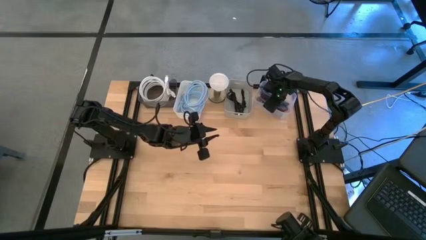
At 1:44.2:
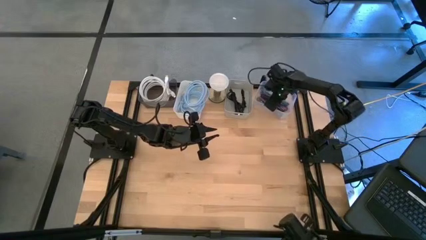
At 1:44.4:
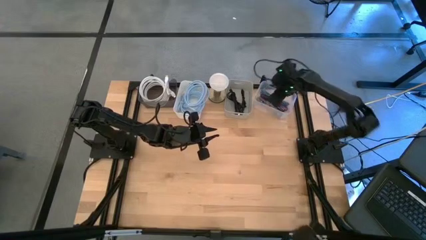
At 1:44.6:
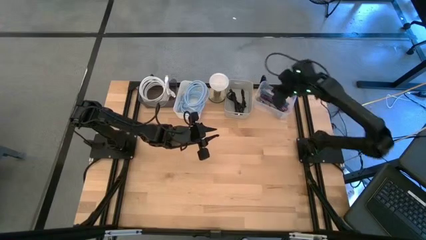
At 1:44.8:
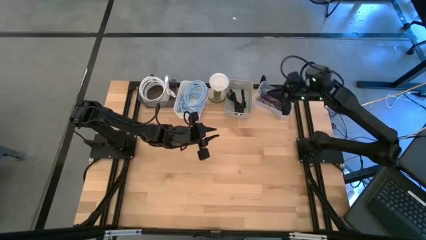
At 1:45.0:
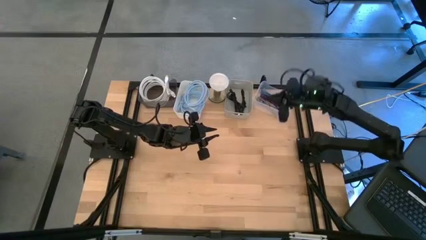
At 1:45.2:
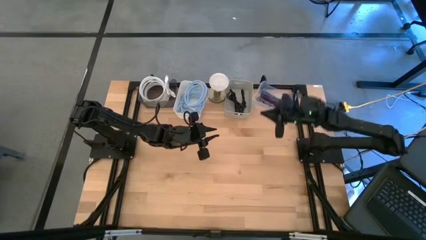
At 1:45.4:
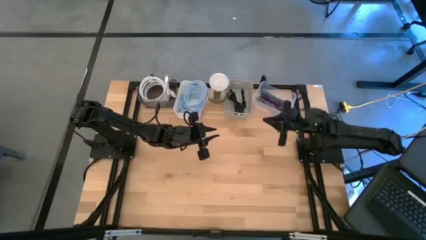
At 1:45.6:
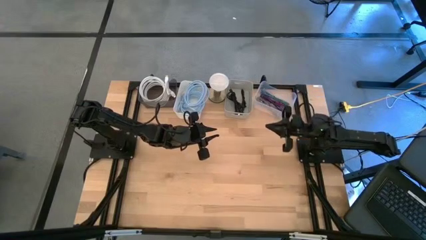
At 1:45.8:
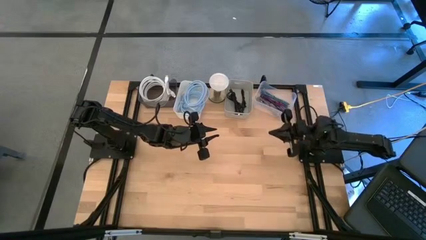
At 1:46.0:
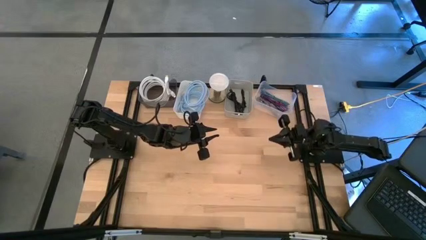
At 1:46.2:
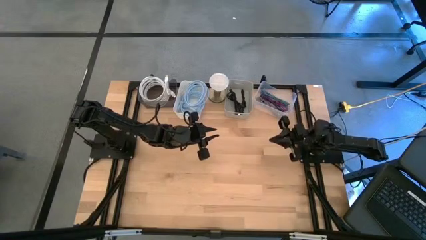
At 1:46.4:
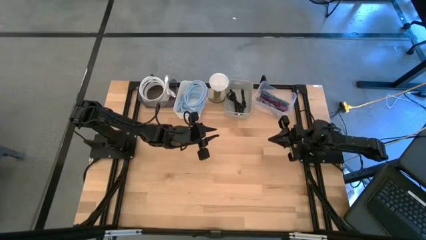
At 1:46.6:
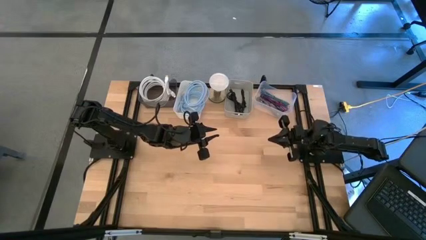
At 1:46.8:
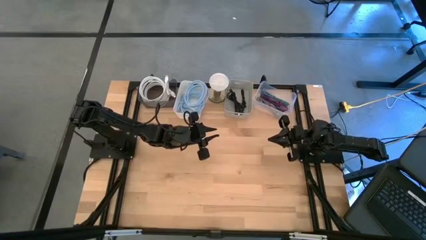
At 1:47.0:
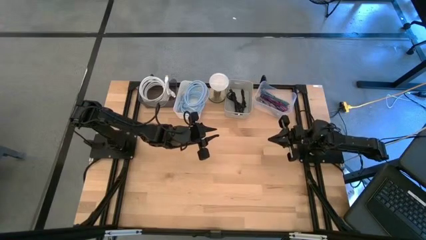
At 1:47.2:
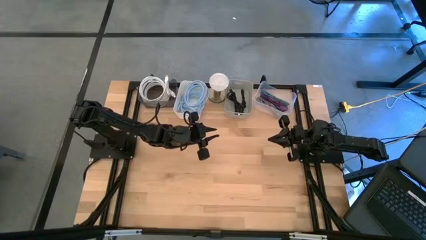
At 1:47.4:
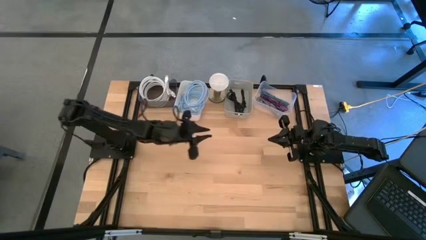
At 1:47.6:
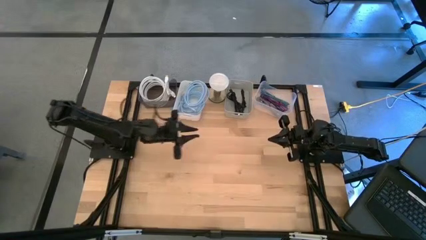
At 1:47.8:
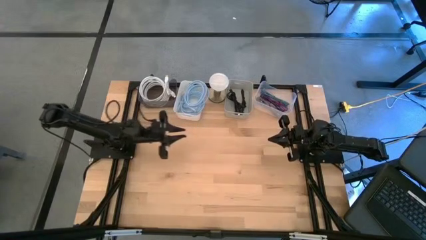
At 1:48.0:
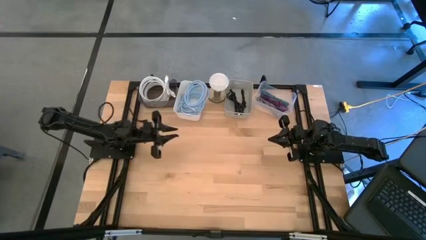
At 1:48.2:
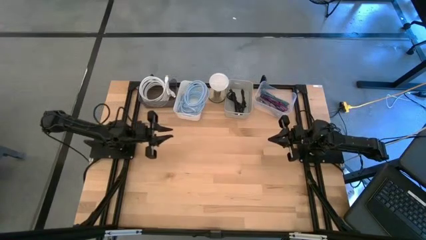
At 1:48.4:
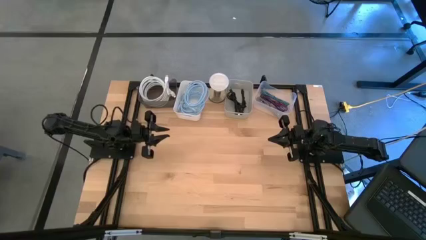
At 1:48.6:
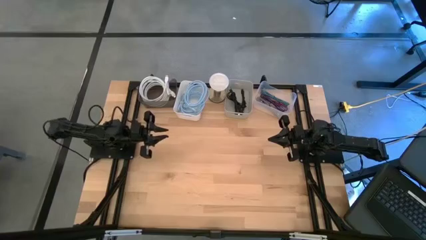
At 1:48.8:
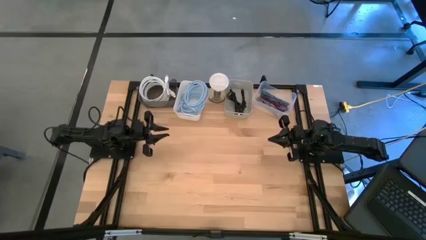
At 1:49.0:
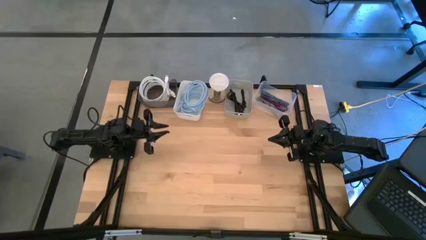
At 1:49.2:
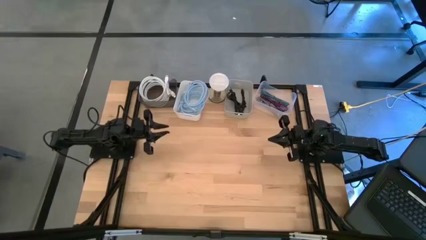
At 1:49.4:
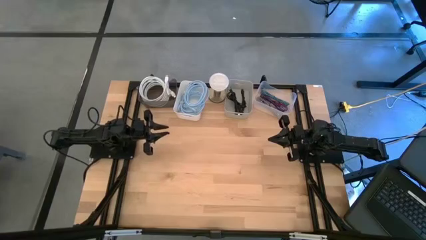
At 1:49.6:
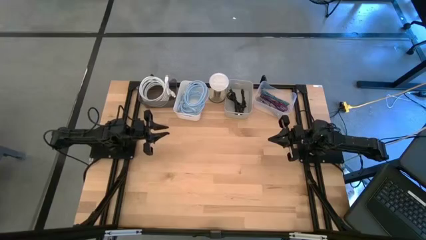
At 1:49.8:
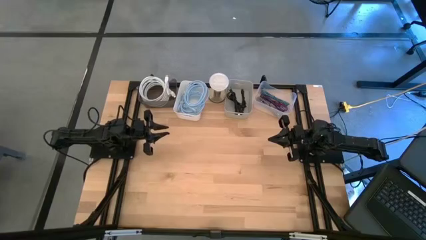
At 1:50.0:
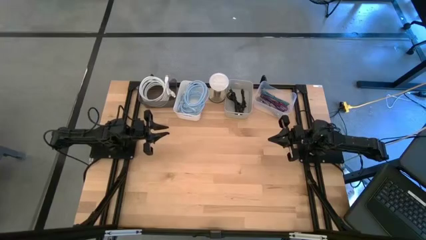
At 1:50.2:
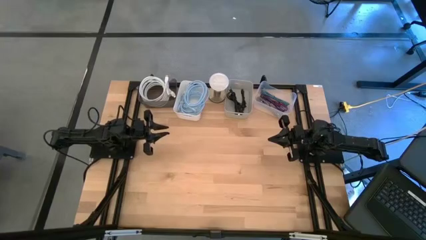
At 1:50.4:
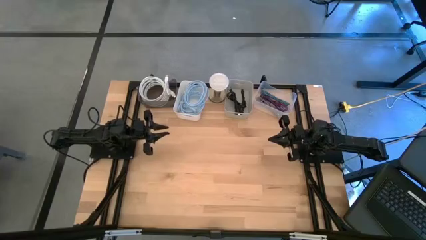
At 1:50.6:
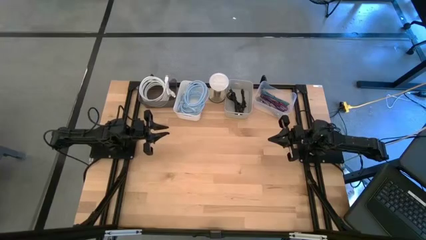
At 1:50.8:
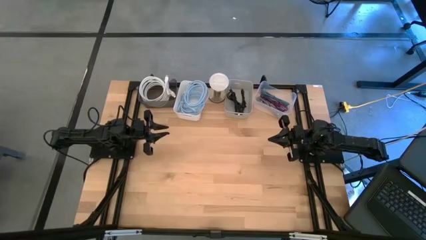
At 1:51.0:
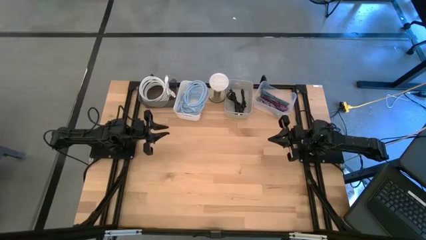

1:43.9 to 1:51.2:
Task: Pick & Place USB Port
Return to Home Position
